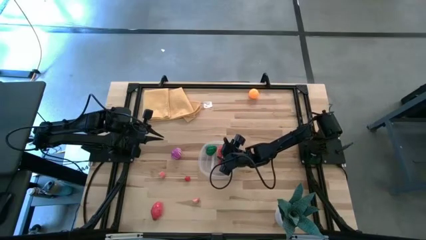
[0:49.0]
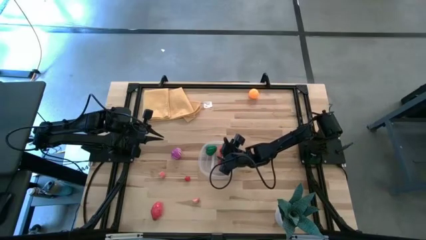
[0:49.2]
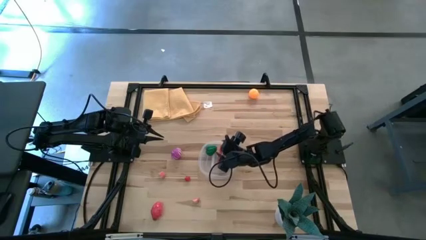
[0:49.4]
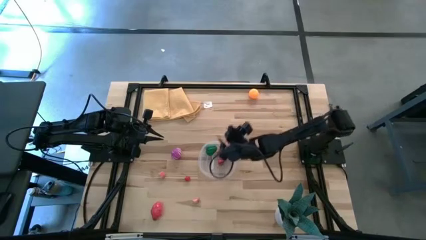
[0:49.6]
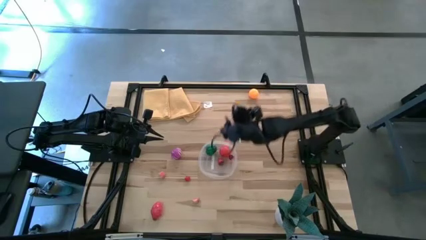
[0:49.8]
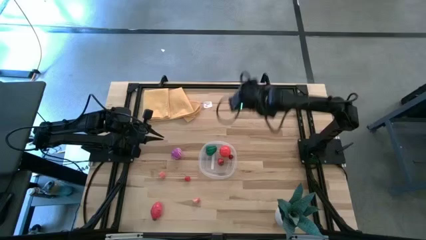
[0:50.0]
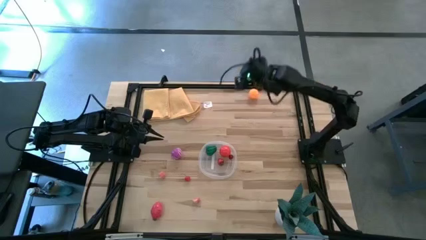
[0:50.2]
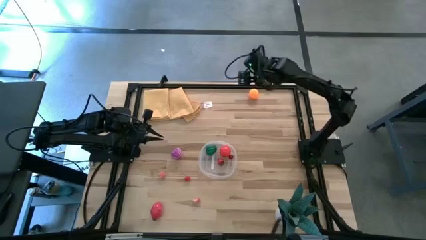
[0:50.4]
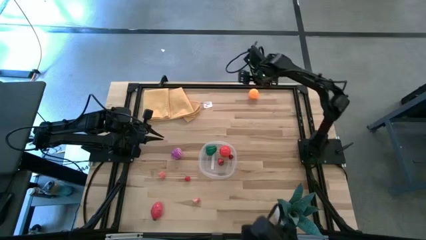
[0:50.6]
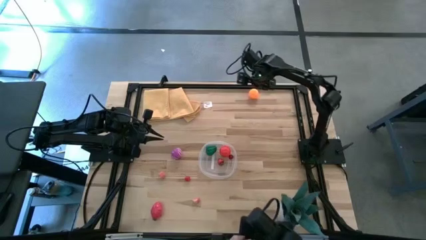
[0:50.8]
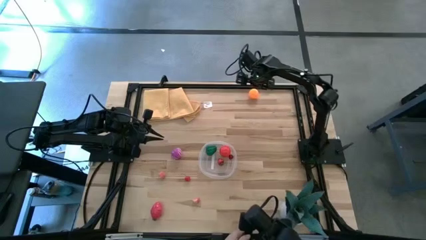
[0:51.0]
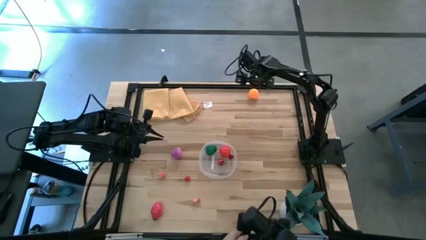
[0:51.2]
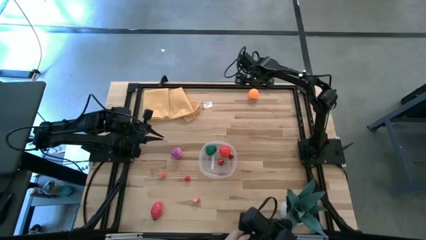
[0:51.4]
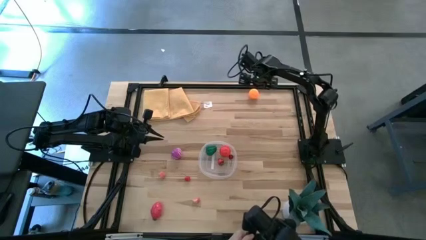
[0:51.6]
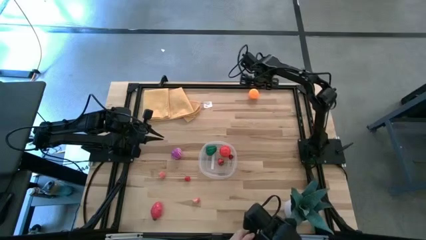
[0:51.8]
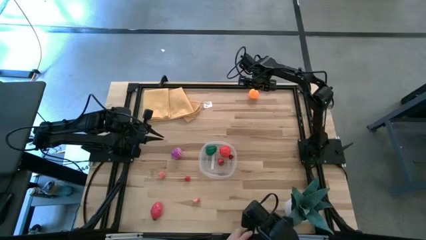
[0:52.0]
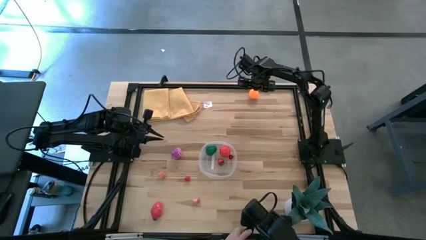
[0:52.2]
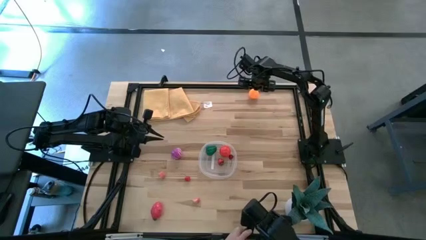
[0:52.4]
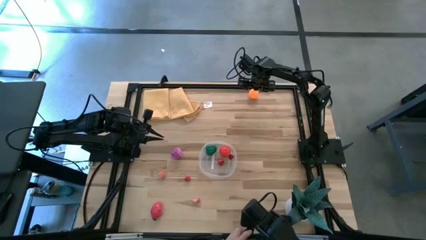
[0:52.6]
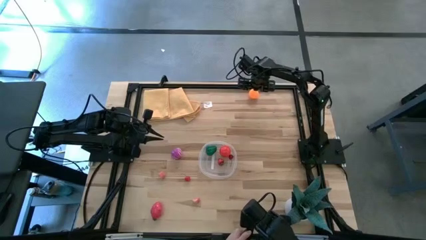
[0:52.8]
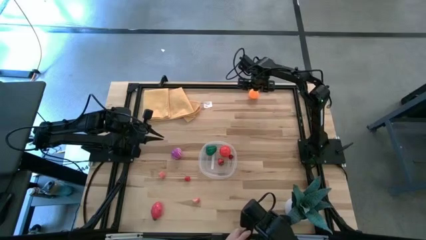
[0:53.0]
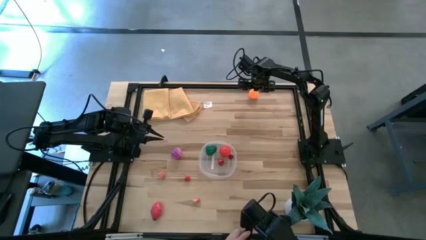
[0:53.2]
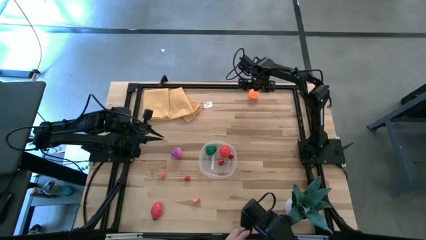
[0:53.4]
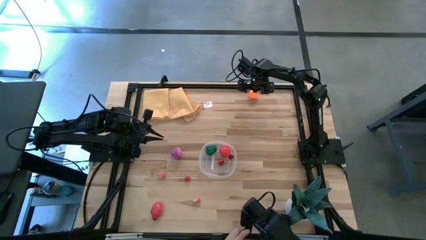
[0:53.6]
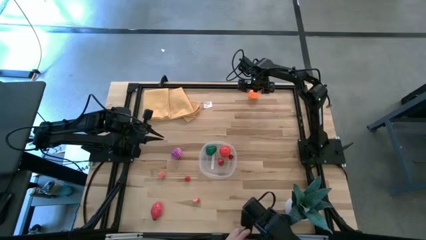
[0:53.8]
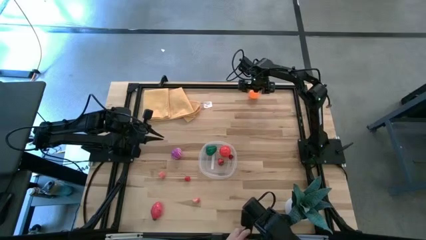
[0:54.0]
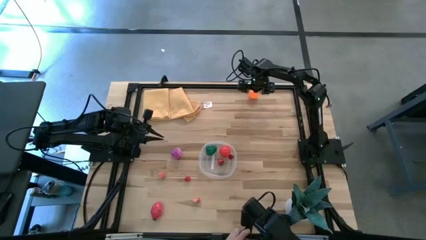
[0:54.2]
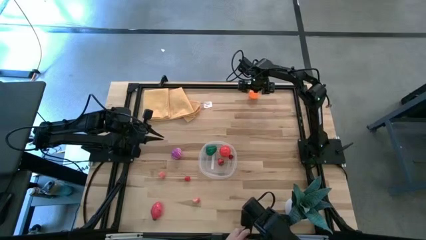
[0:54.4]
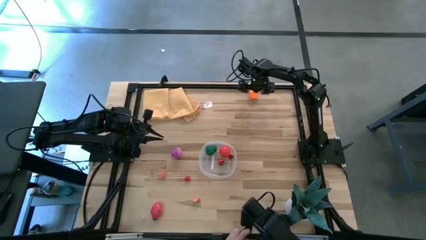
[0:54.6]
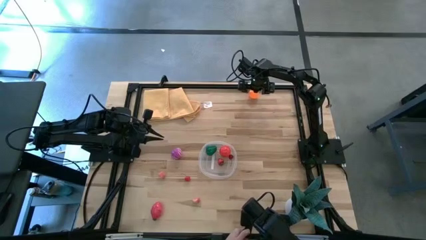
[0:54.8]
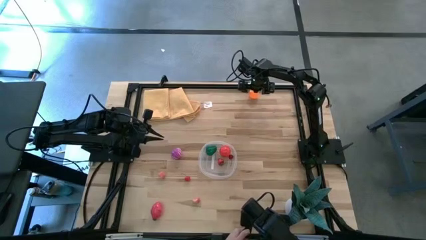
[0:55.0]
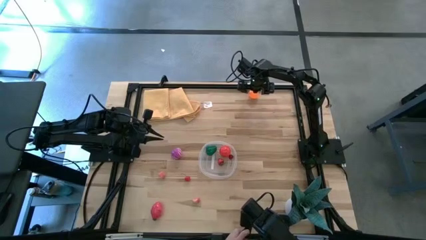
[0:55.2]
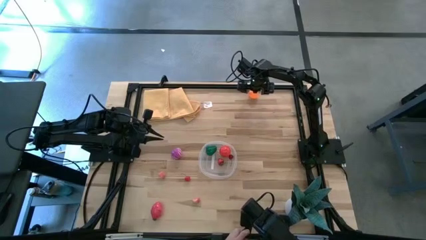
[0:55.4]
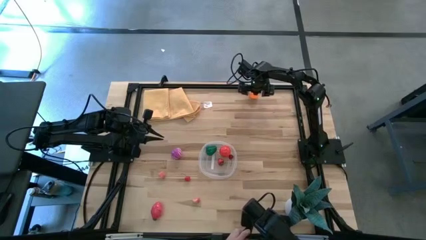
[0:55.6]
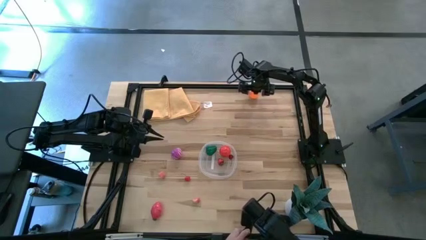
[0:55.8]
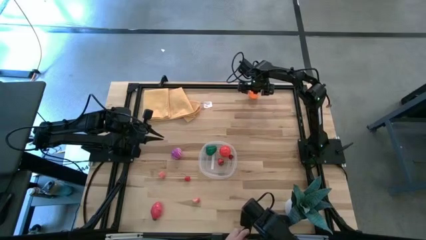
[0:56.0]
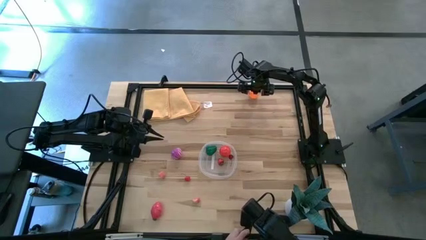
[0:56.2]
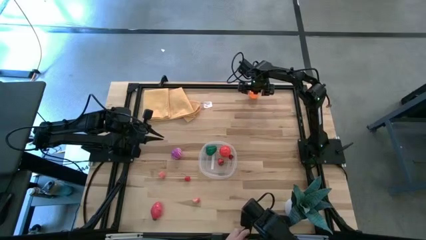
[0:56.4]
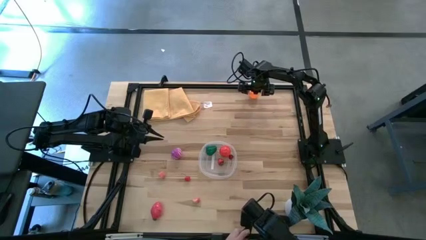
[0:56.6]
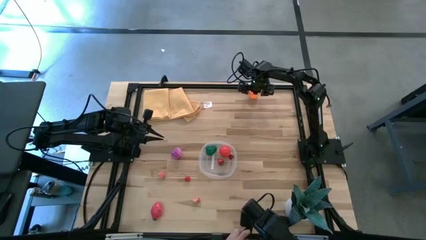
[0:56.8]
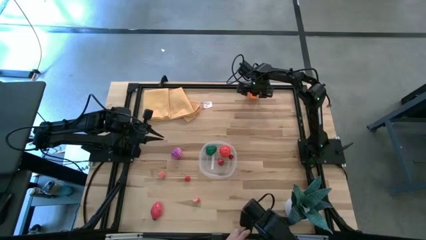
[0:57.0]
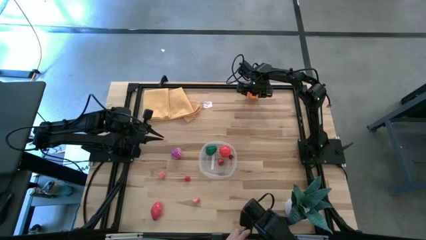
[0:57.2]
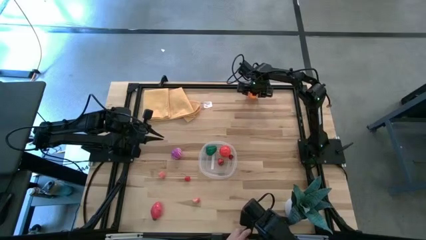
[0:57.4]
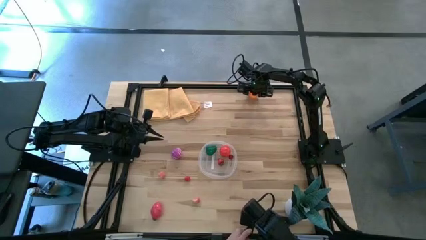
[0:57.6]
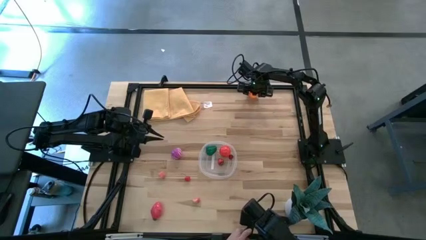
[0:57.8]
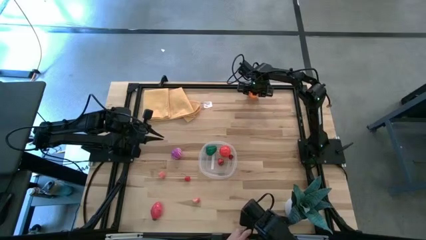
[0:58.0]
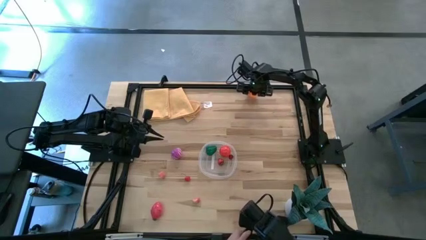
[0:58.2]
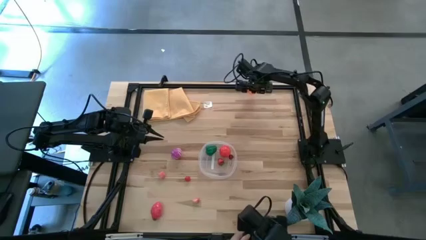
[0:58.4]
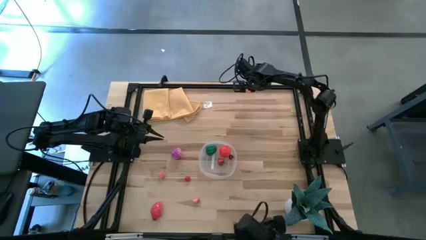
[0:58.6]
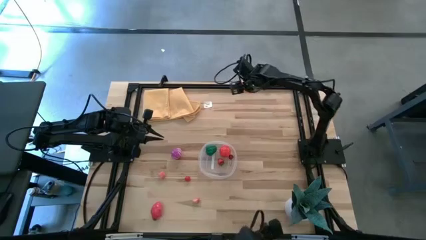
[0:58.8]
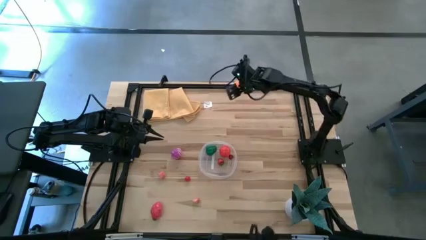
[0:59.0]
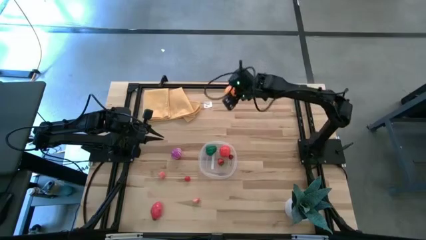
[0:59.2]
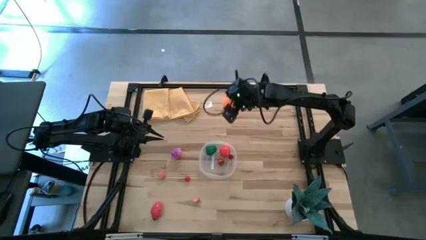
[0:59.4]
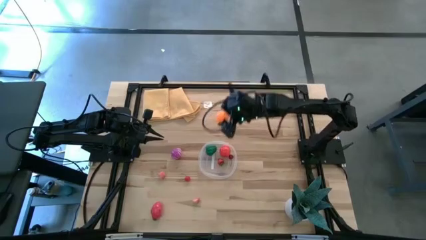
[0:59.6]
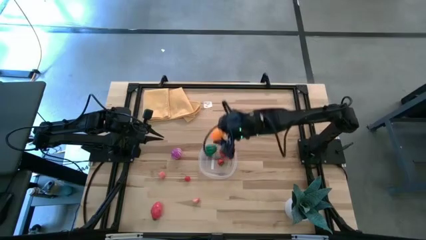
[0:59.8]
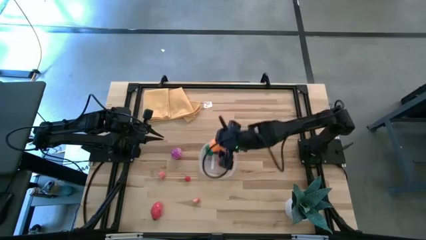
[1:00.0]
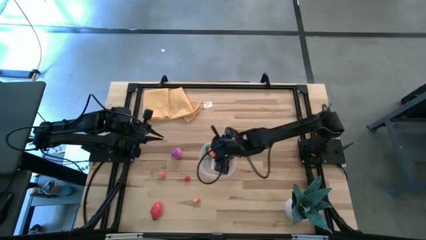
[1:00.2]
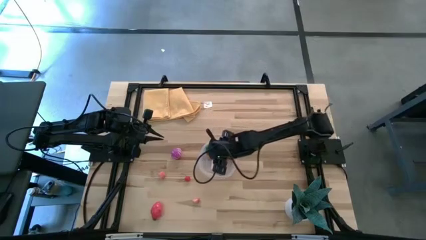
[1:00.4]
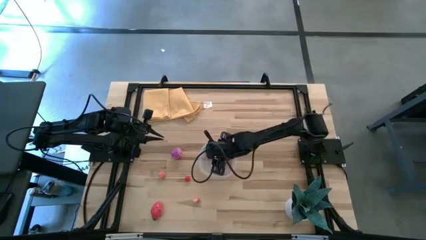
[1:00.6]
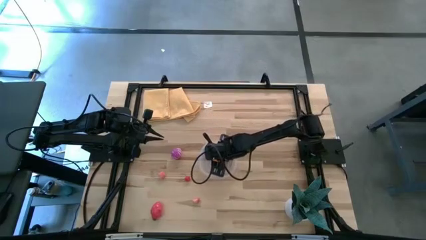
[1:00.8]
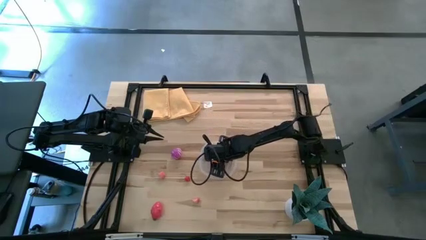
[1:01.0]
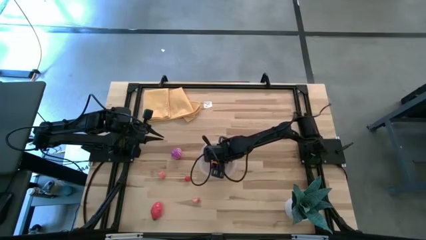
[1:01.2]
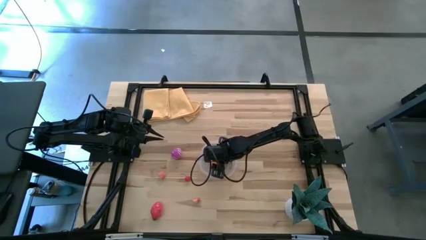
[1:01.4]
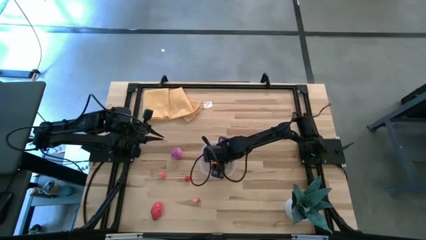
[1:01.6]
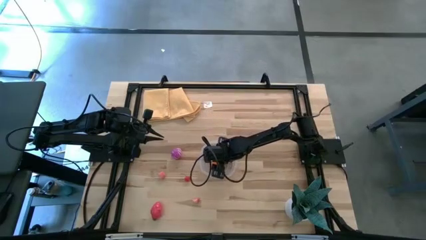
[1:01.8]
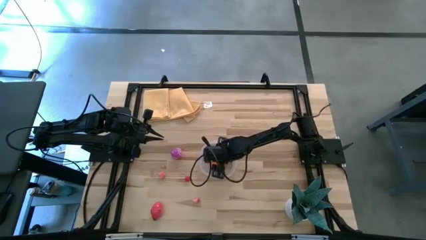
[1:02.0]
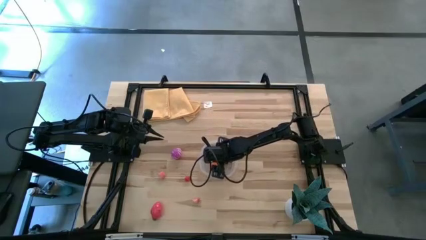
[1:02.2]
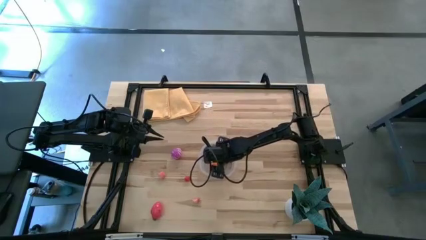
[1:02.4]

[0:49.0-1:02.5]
Task: Pick and placing Produce into tupperware
Put the orange into the transparent bin

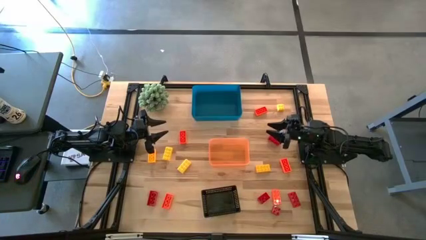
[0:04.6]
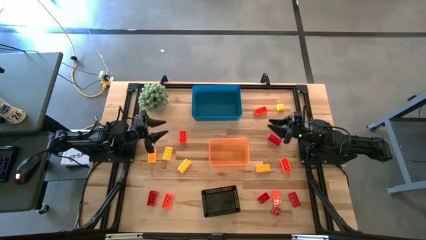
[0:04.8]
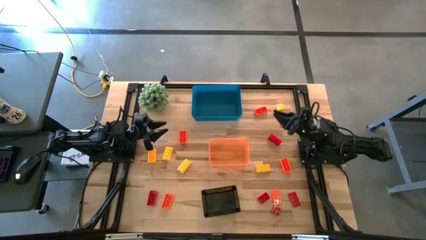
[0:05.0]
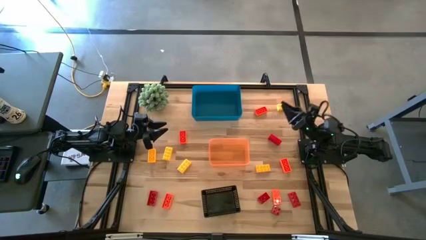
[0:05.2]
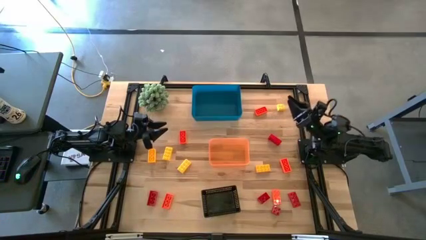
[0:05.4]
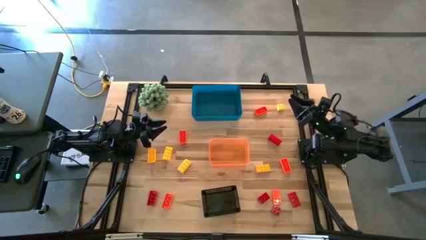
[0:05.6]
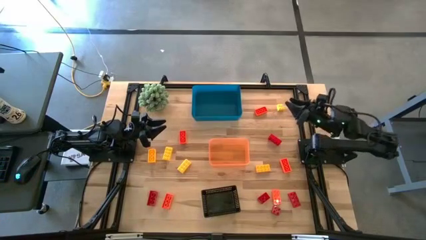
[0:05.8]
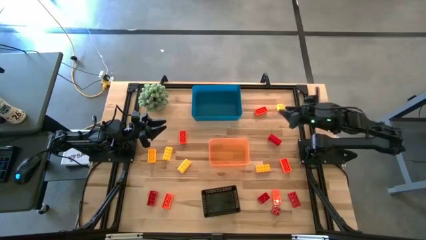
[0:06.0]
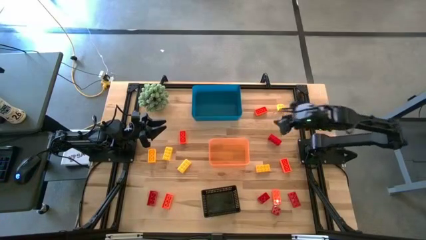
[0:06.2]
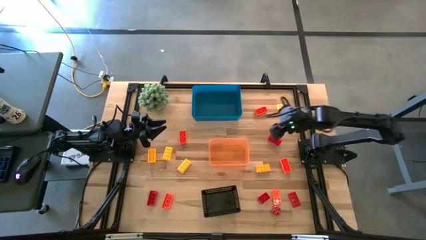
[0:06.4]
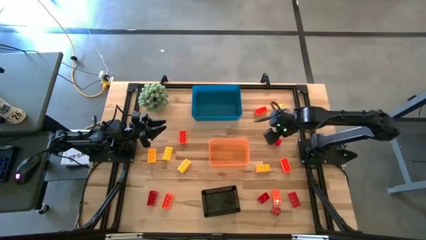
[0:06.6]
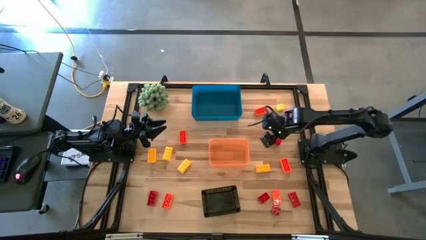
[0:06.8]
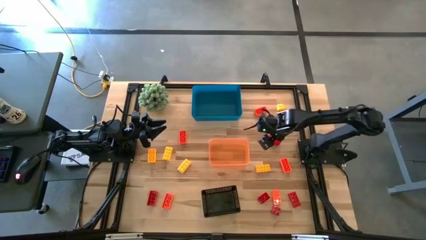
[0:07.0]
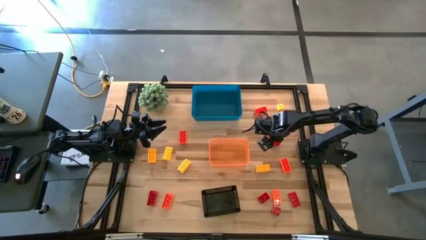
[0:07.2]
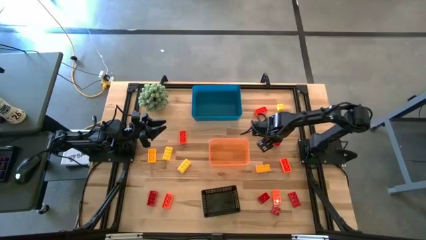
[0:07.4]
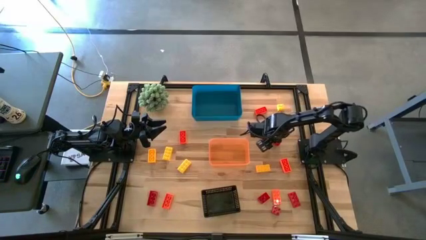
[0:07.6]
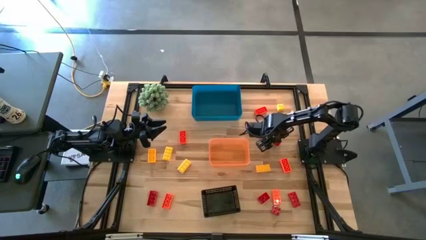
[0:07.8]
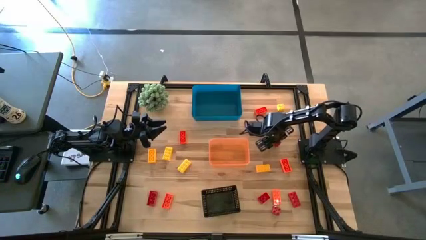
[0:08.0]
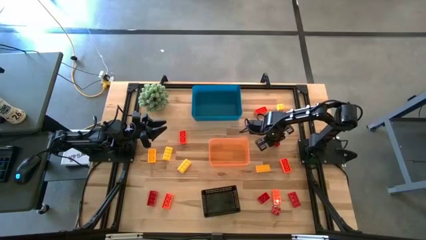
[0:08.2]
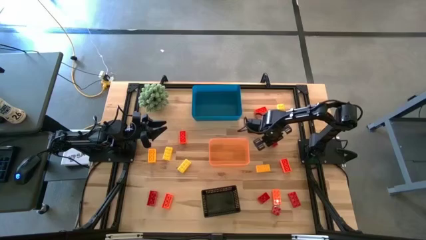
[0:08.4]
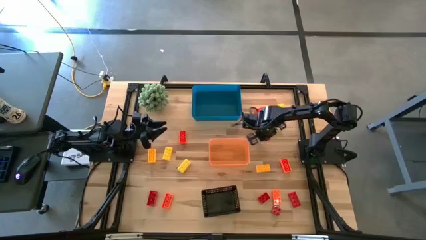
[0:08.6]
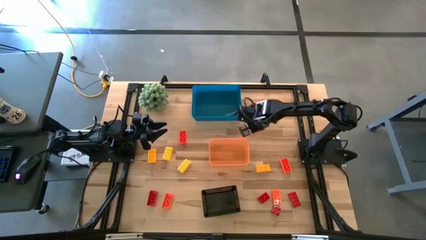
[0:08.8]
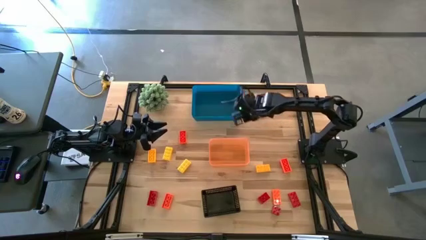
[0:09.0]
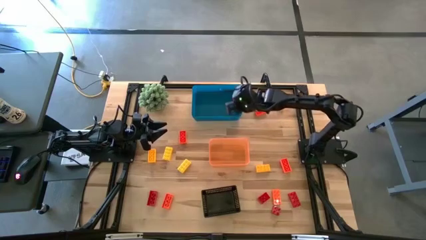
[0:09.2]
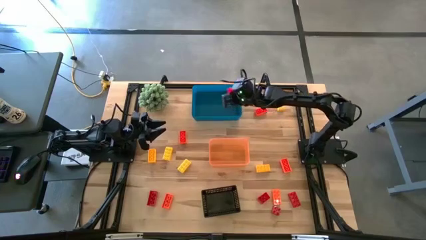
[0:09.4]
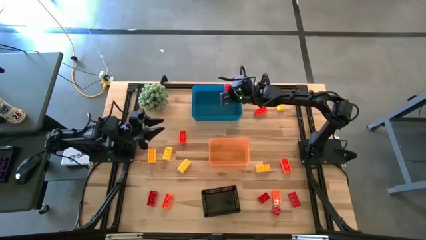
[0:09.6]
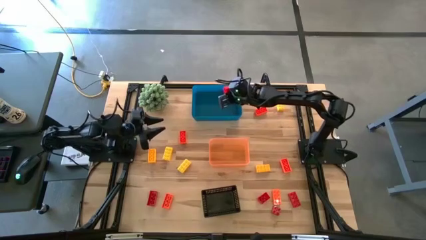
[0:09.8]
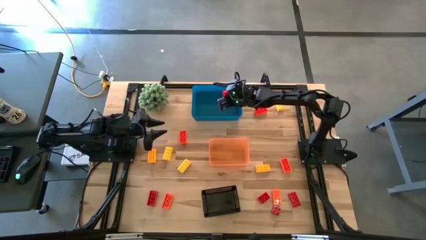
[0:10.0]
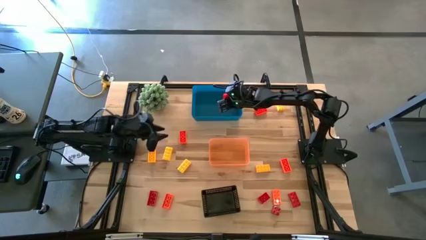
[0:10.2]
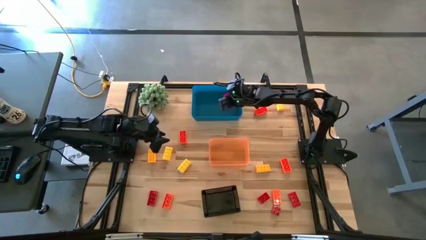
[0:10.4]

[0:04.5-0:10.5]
Task: Sort & place blocks by color
Put the red game piece into the blue bin
